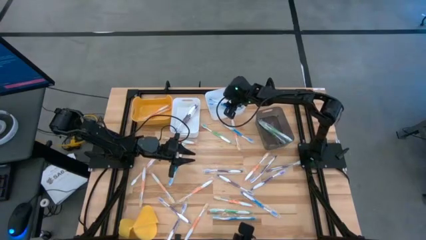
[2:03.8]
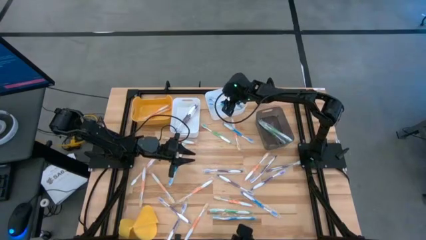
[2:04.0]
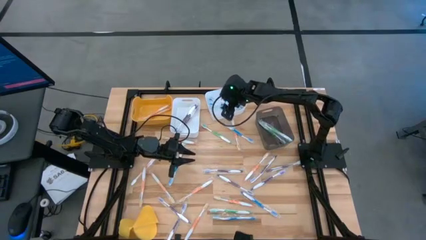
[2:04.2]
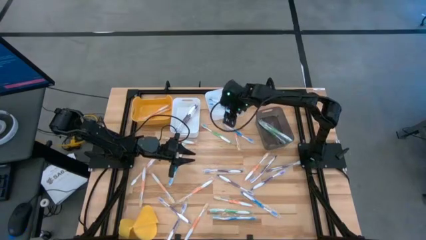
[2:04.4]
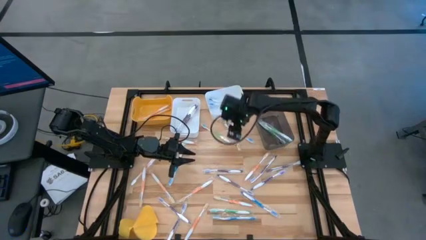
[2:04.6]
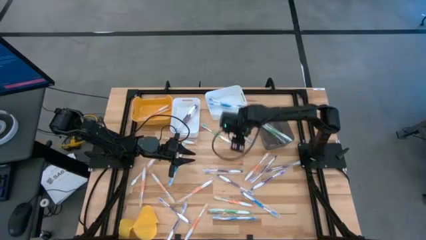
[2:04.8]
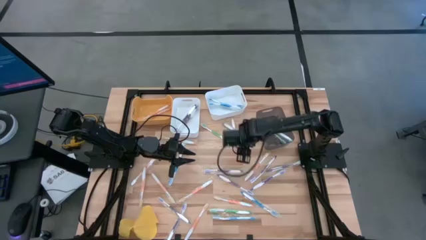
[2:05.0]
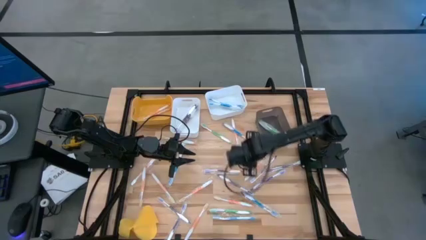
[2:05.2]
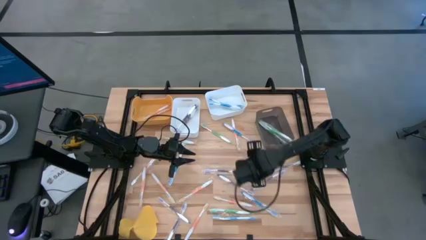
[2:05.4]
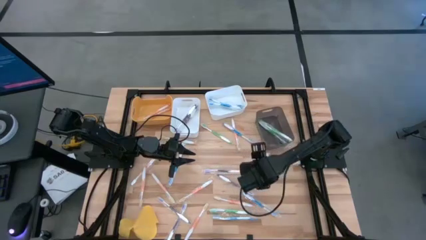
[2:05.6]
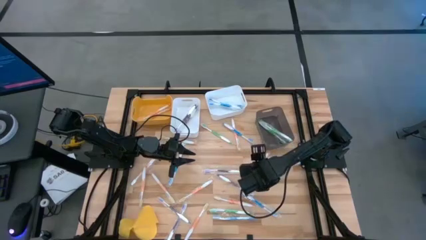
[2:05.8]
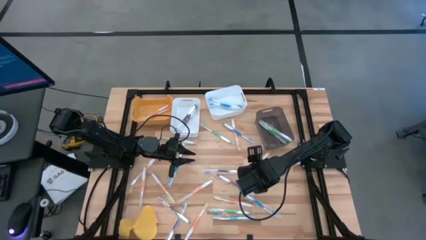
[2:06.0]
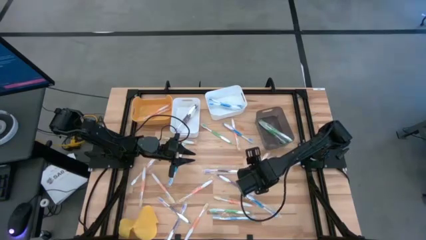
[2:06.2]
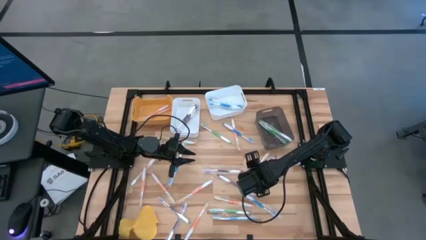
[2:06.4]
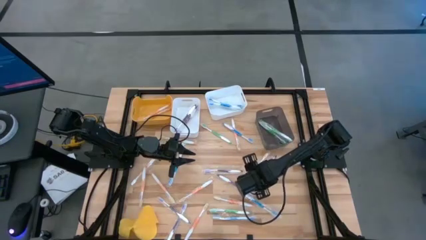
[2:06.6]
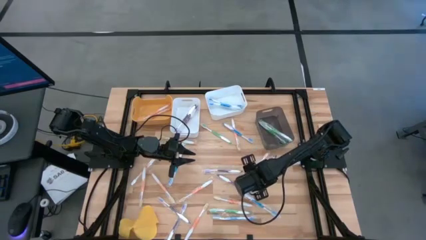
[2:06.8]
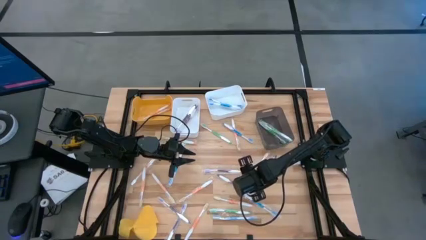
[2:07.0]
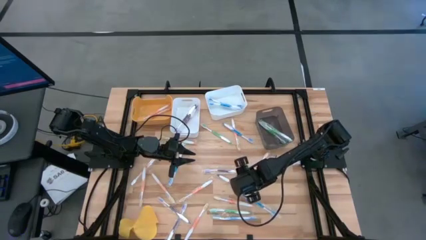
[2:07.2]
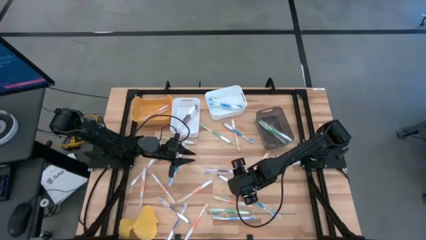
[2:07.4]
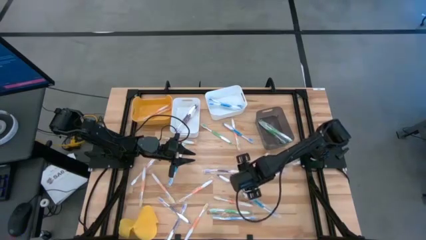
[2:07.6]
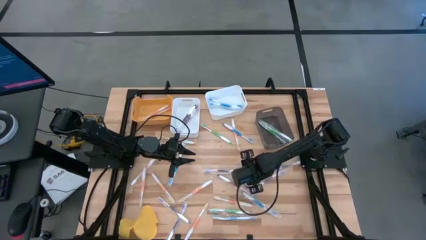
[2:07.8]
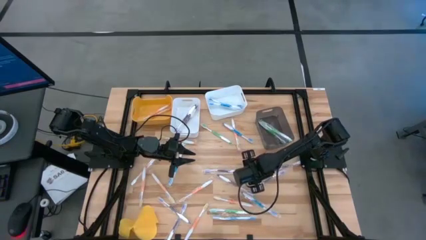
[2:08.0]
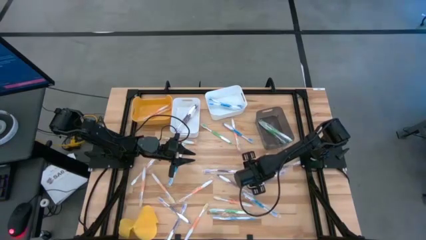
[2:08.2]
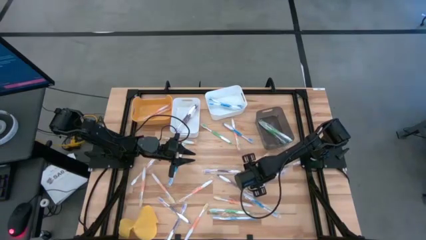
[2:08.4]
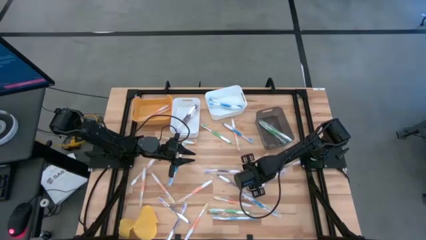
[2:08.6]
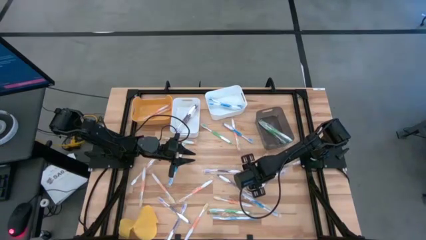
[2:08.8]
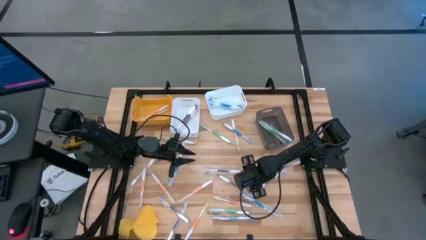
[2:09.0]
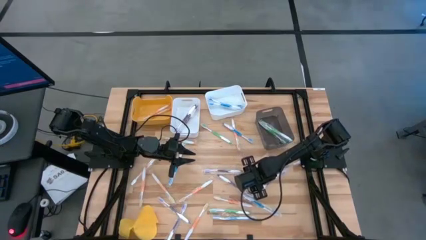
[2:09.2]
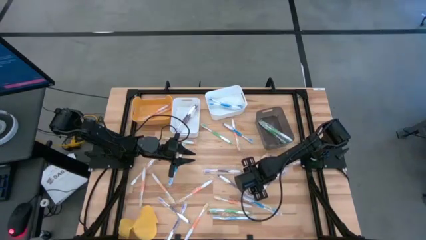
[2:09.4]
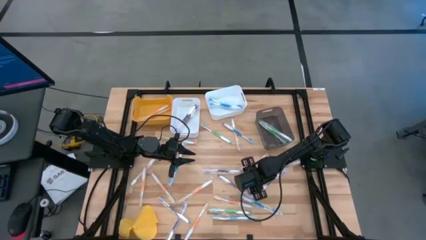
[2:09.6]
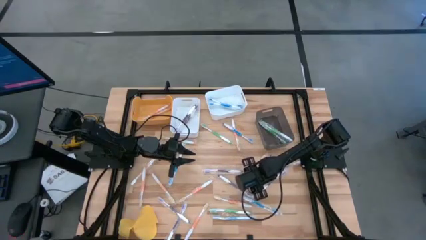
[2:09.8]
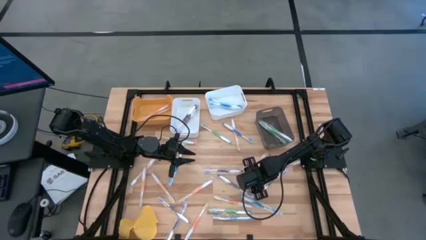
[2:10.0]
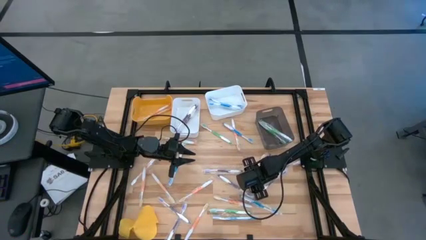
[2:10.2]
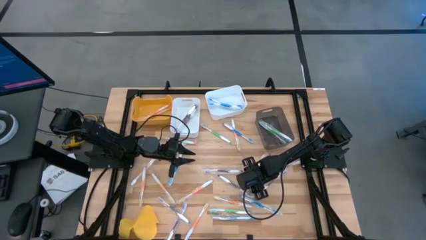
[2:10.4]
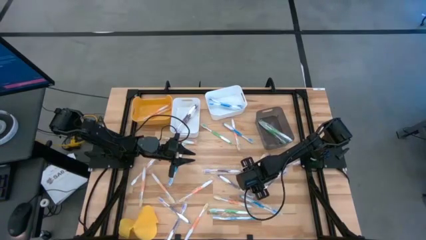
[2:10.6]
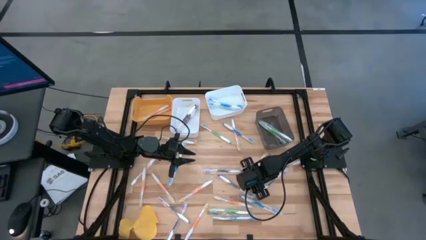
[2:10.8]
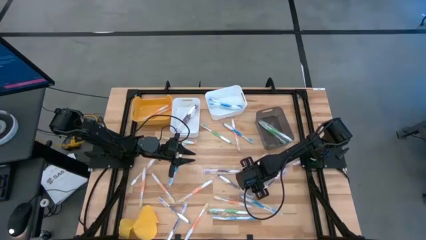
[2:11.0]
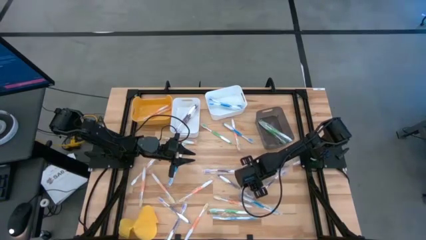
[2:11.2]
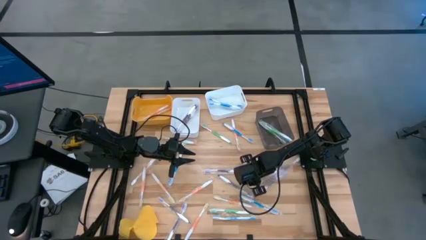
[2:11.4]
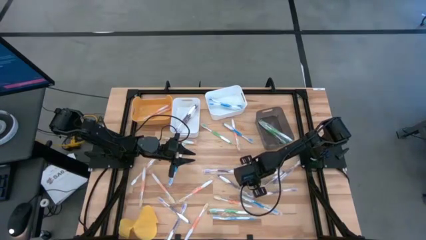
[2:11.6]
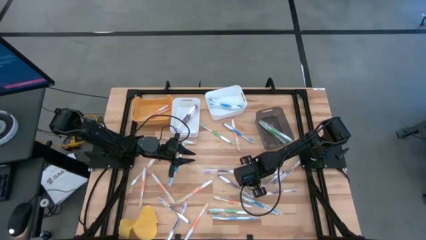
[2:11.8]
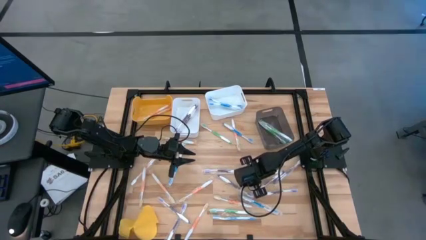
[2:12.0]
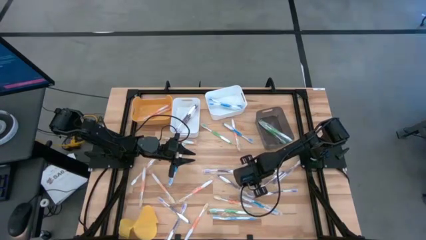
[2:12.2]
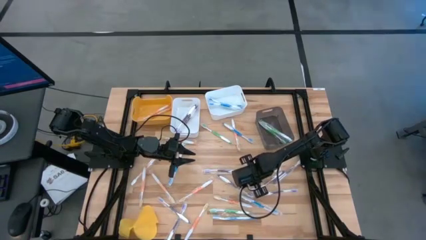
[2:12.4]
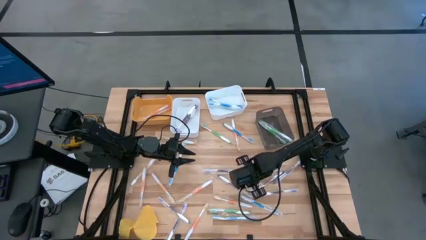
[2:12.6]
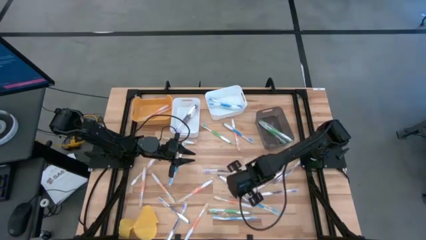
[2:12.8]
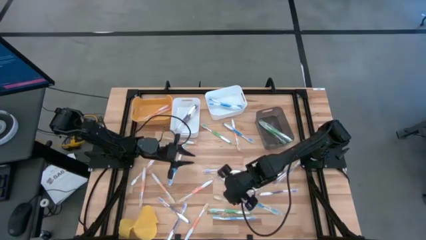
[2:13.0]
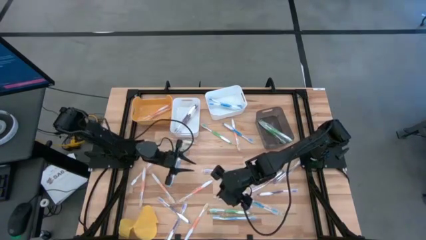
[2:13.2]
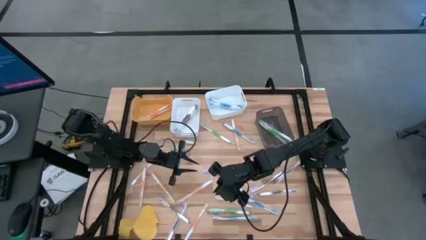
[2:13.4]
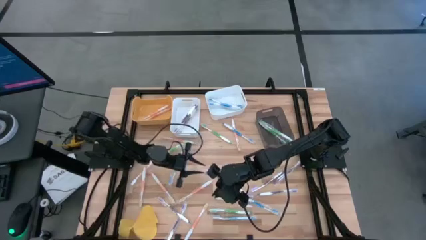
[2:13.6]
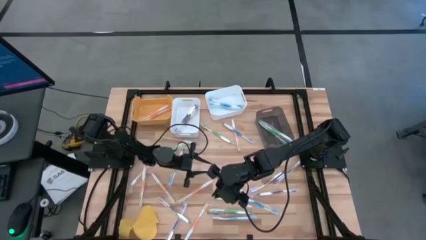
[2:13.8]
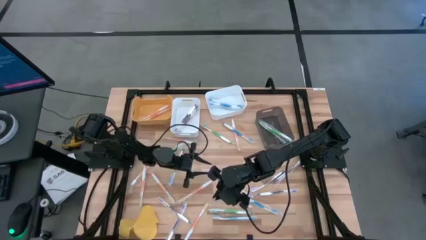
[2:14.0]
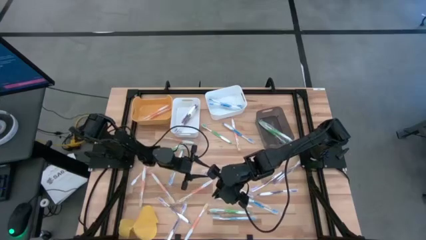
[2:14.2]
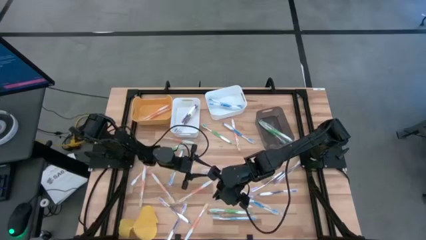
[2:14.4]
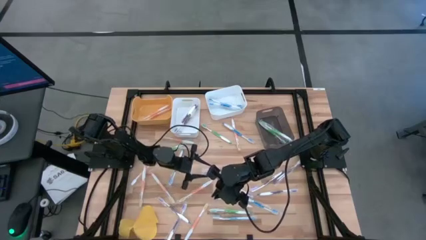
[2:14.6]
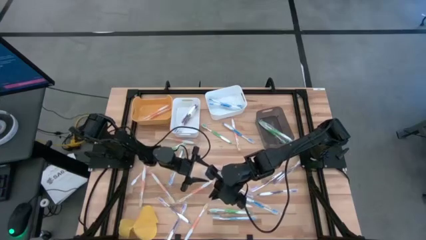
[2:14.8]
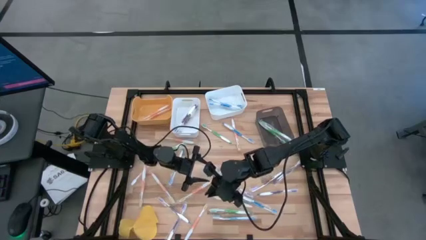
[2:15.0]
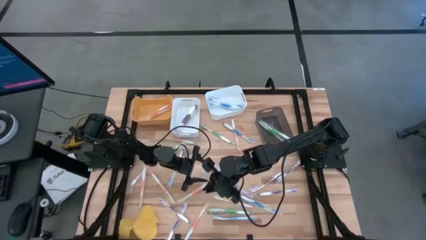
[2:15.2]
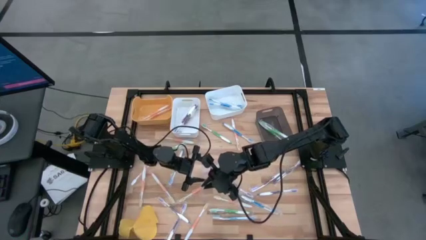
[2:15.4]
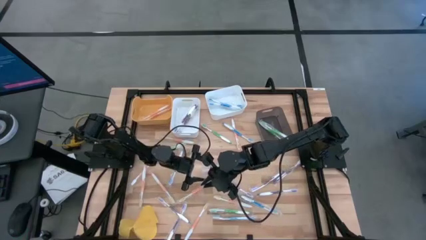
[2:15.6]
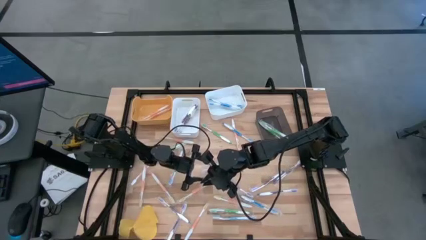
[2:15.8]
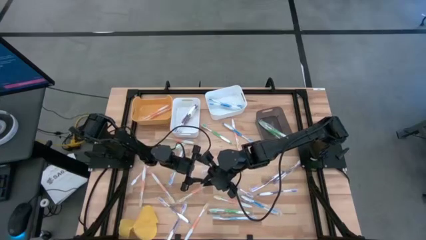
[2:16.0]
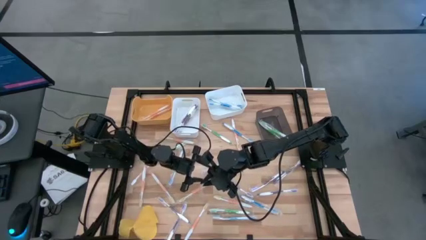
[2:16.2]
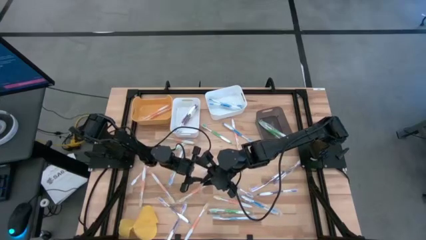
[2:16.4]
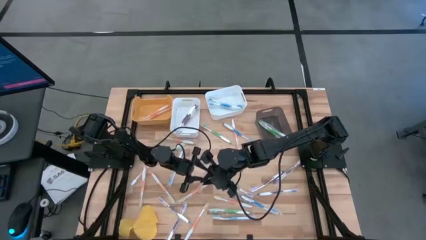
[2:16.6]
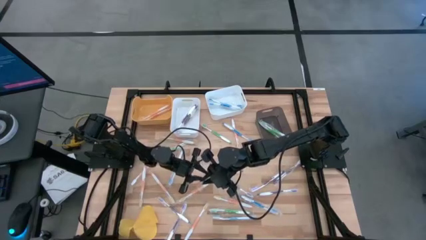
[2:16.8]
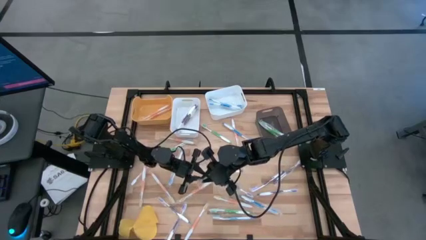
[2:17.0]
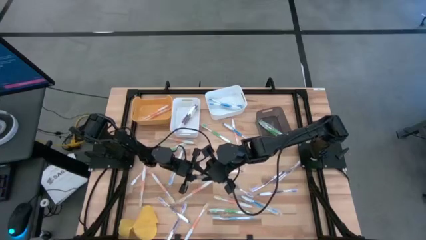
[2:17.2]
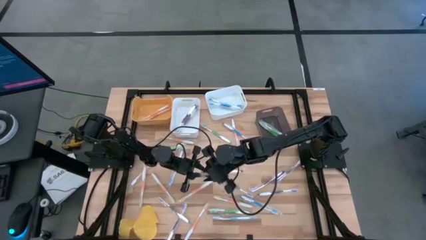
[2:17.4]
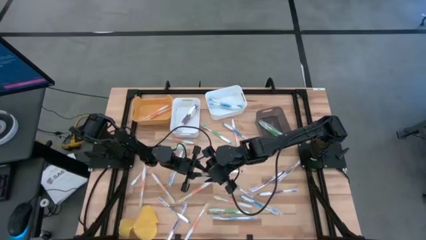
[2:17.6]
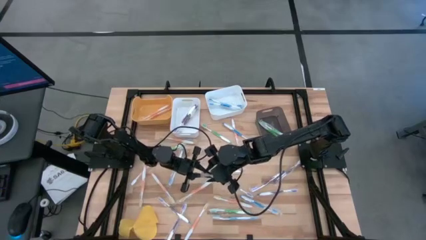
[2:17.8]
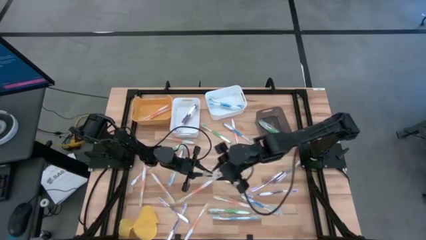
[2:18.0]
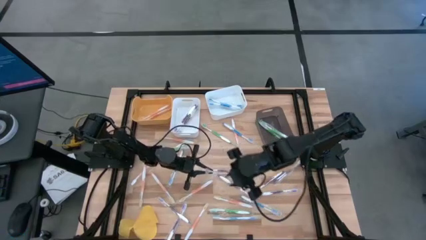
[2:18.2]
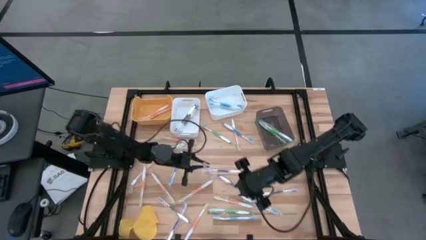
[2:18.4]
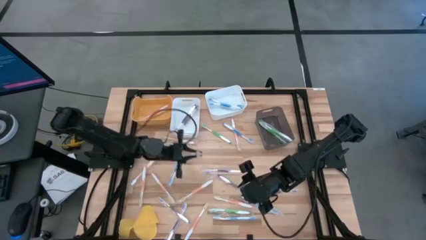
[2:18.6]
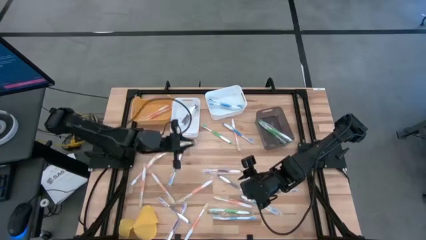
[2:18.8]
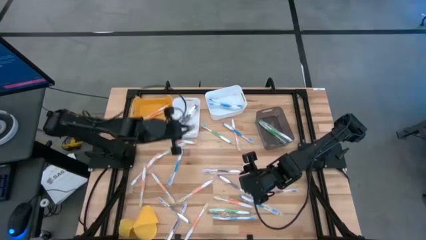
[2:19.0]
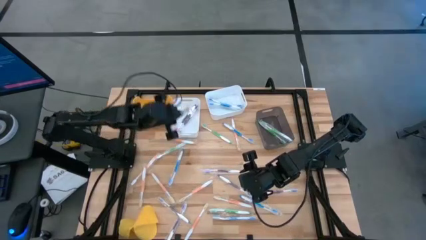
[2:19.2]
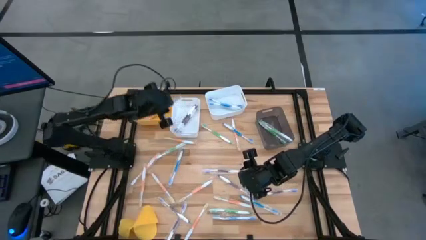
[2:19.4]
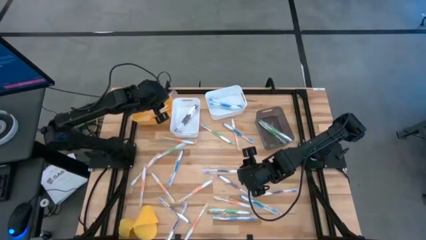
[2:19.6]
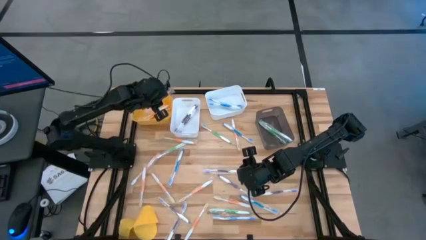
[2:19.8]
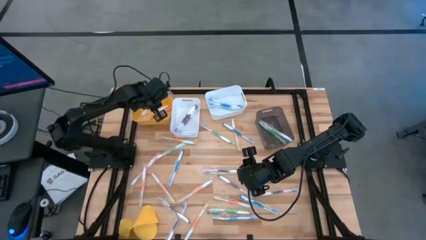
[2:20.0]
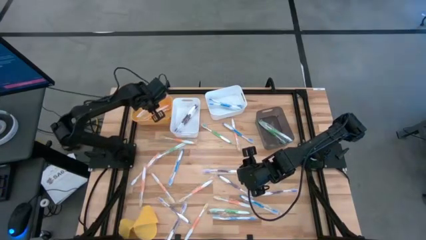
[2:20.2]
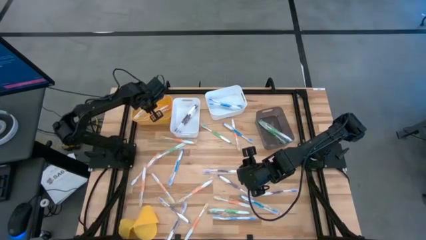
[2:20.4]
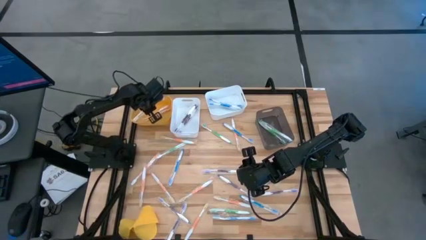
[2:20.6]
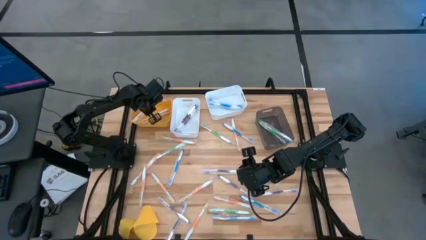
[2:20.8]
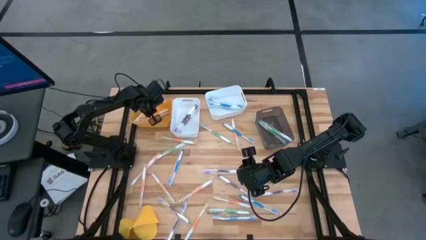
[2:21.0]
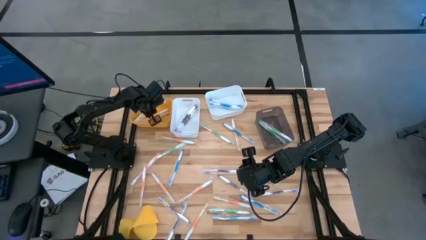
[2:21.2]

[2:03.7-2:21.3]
Task: Pick & Place Toothbrushes
Put the orange toothbrush into the yellow bin
